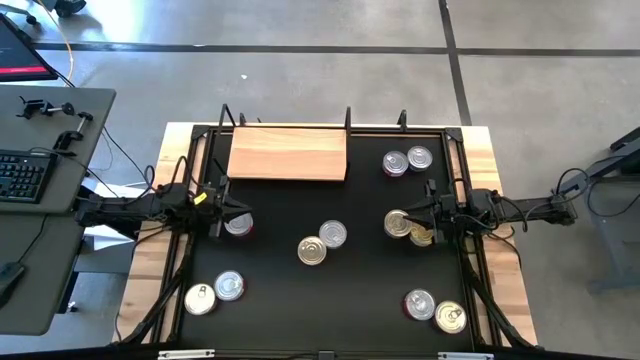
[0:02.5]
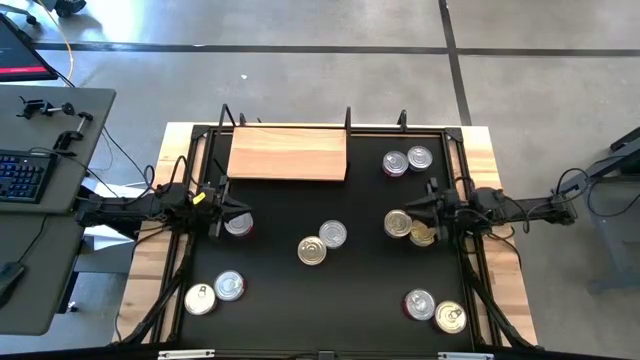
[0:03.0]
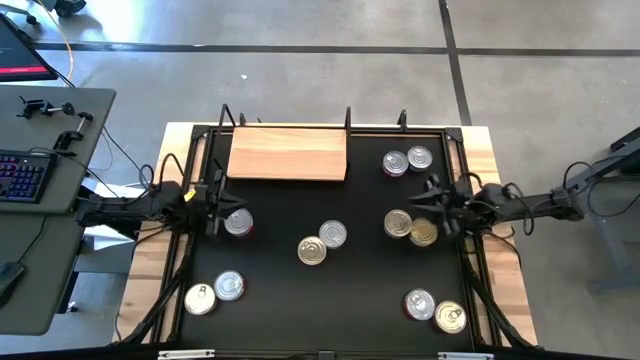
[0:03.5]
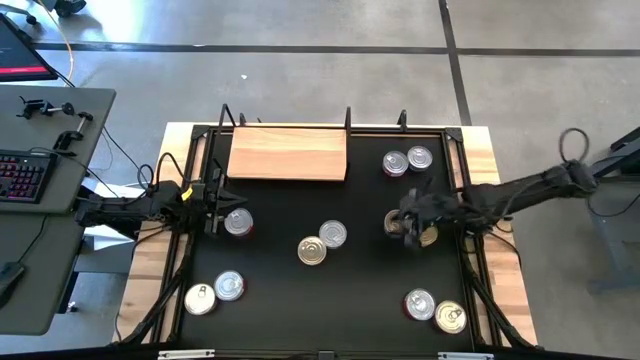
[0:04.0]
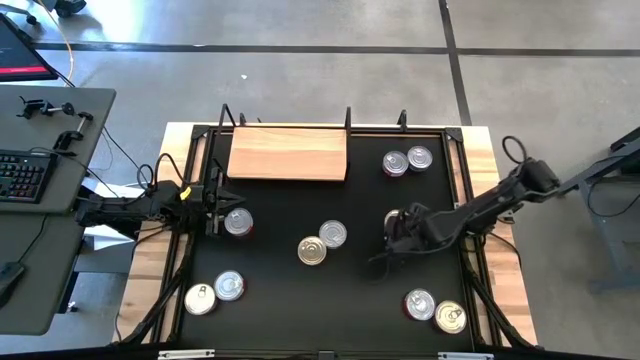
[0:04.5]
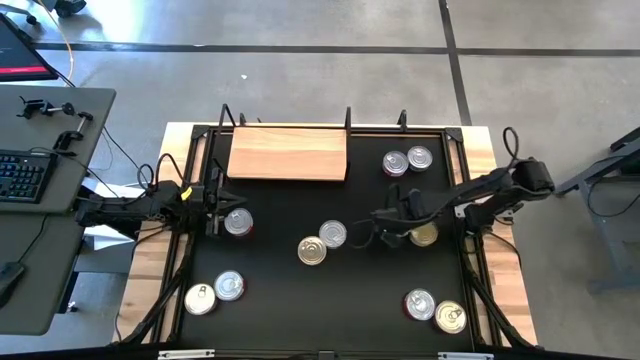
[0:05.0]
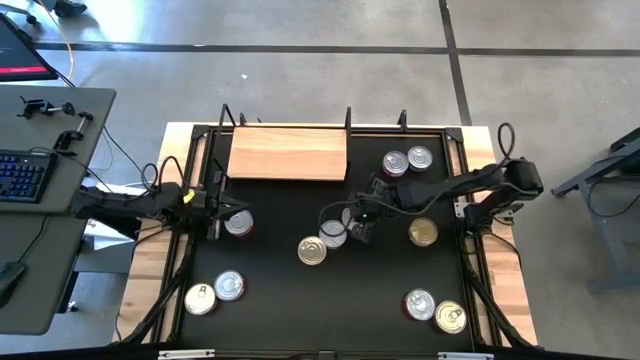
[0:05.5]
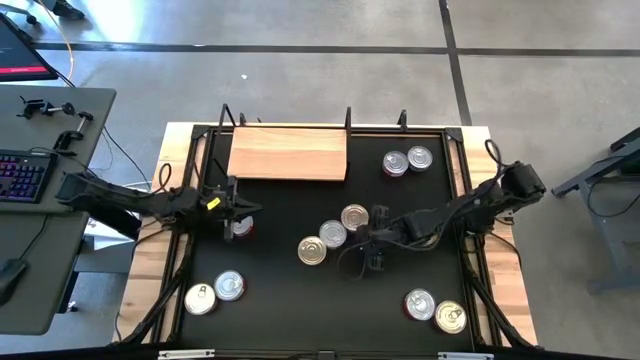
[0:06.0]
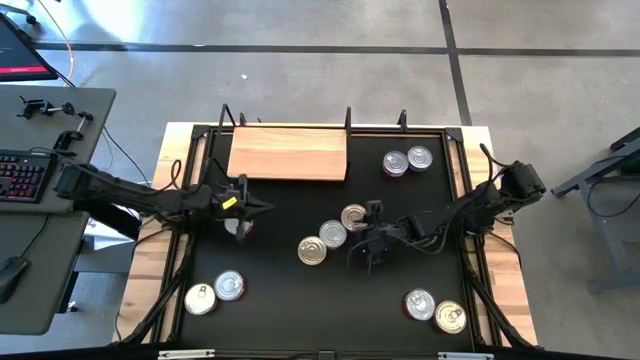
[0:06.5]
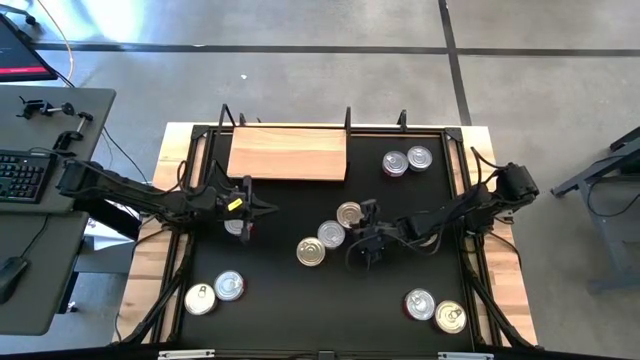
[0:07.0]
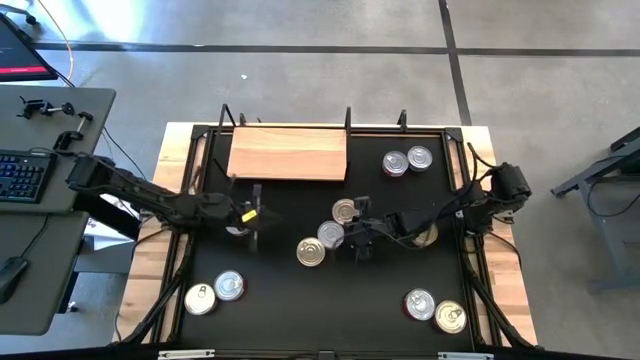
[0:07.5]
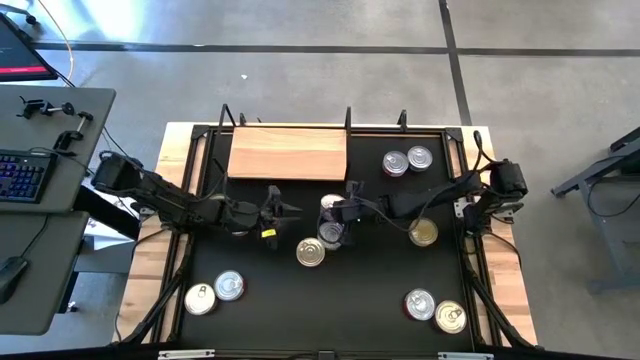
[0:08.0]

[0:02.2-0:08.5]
Task: Stack canned seafood by type on shelf
Put the blue pink tuna can on the shelf

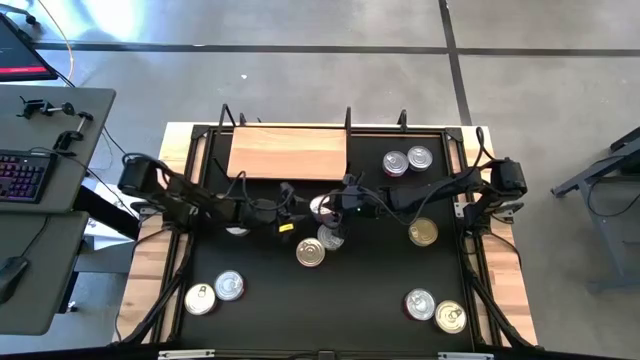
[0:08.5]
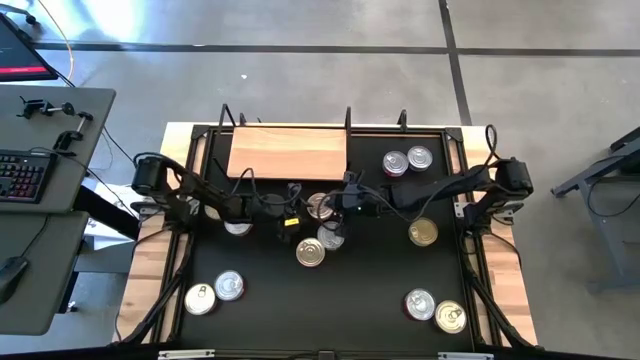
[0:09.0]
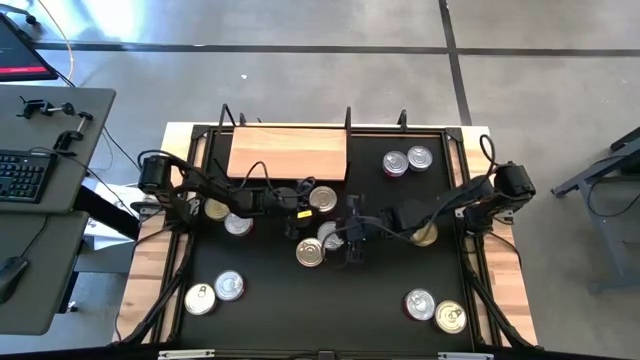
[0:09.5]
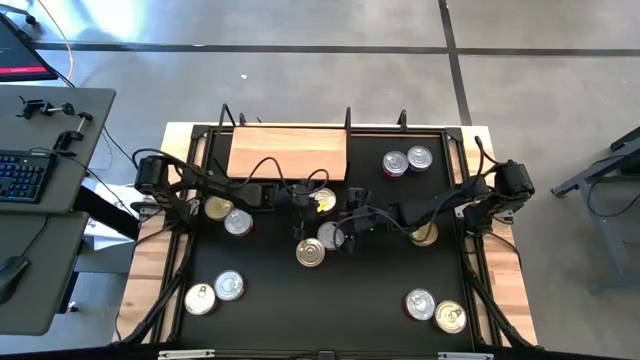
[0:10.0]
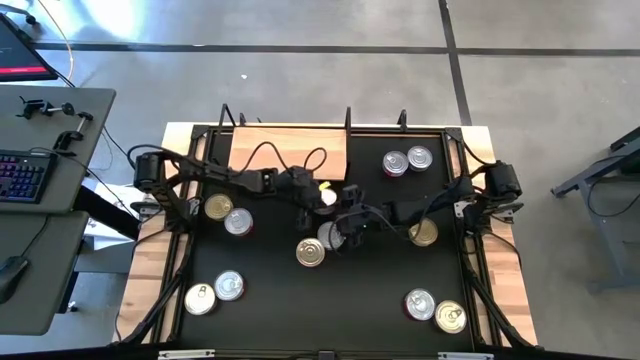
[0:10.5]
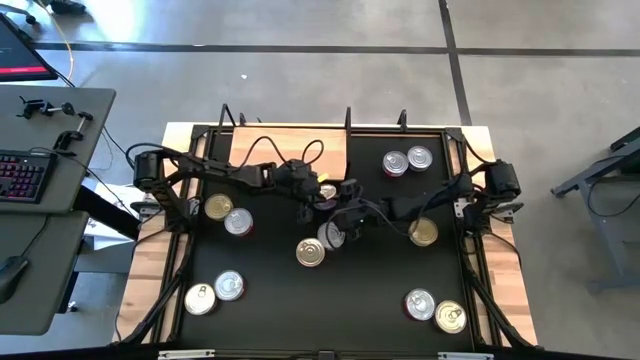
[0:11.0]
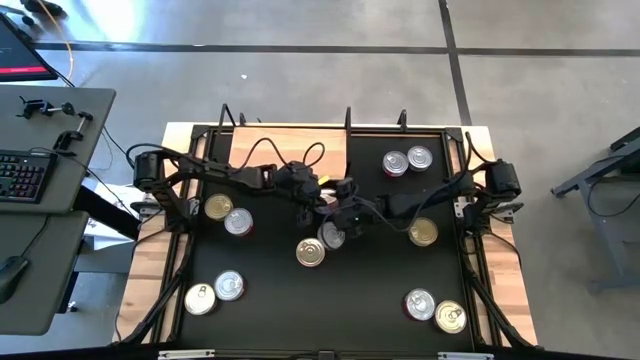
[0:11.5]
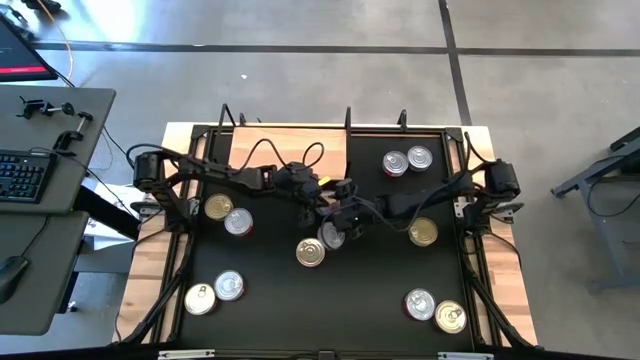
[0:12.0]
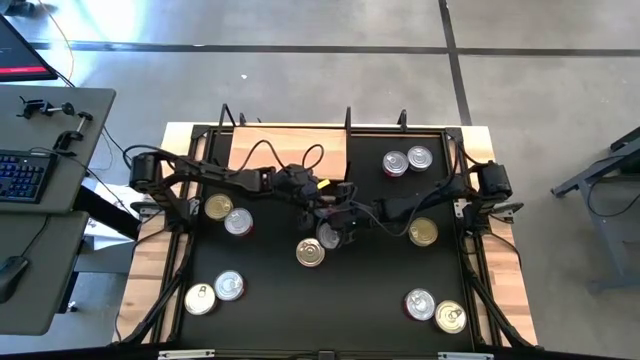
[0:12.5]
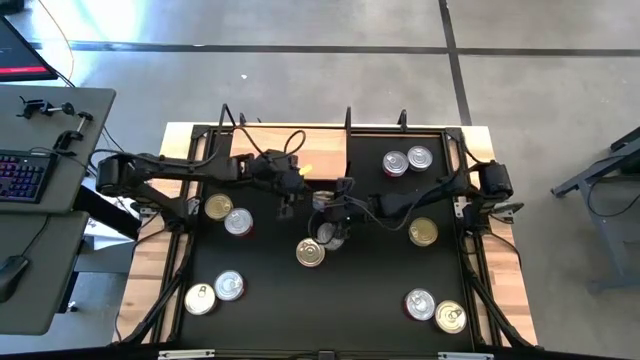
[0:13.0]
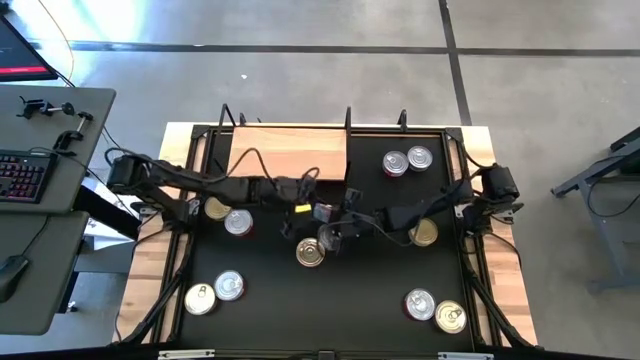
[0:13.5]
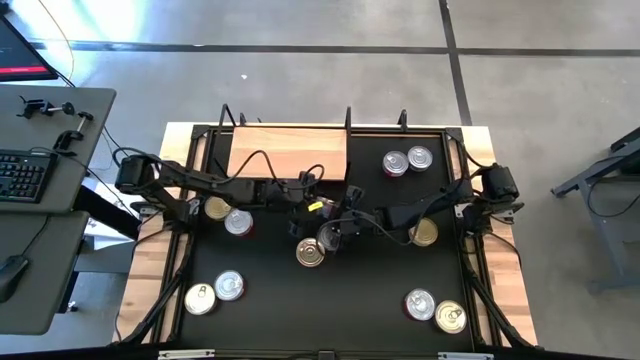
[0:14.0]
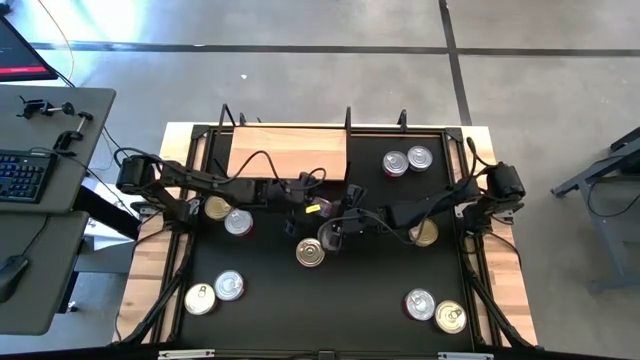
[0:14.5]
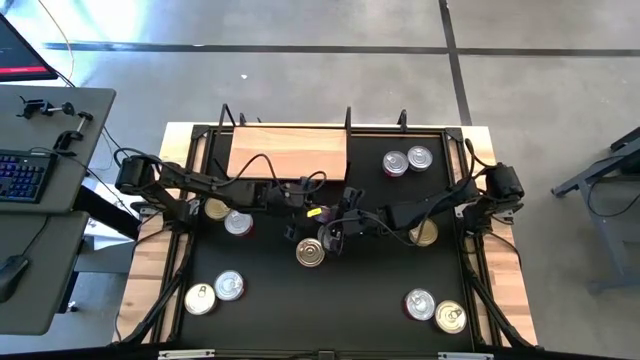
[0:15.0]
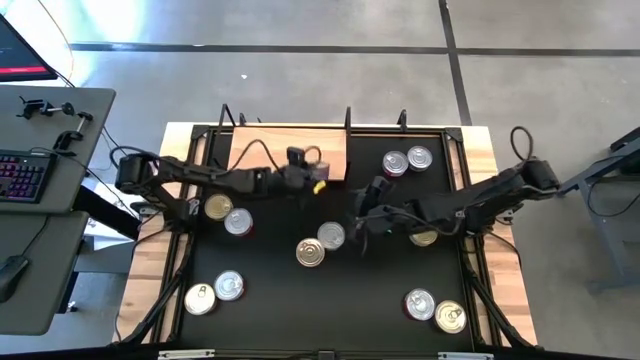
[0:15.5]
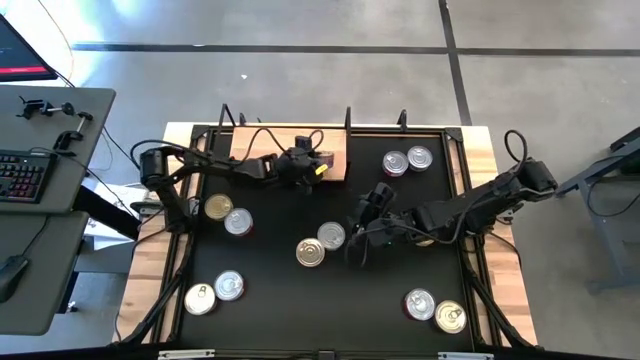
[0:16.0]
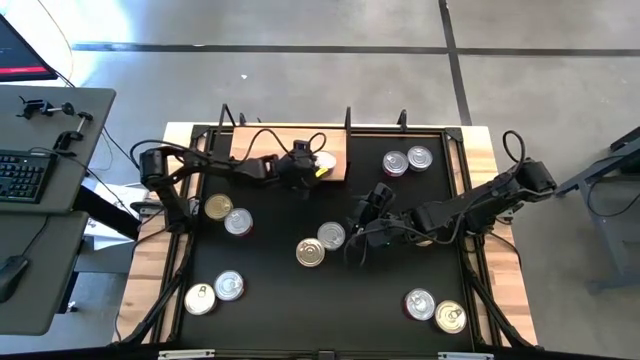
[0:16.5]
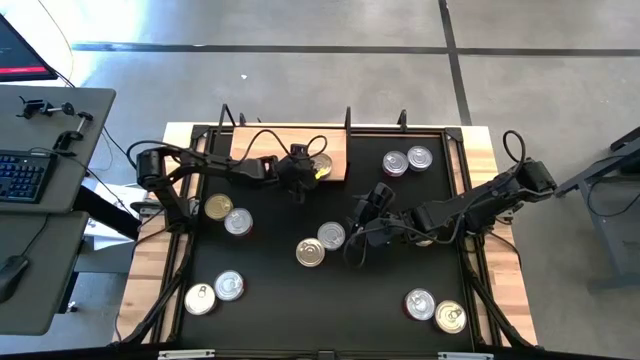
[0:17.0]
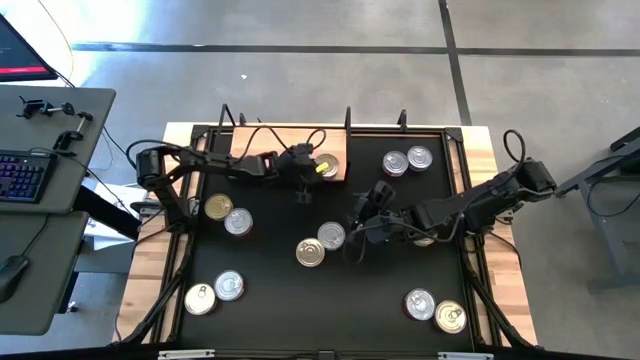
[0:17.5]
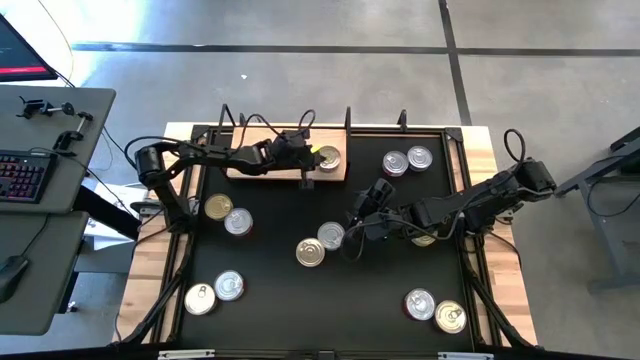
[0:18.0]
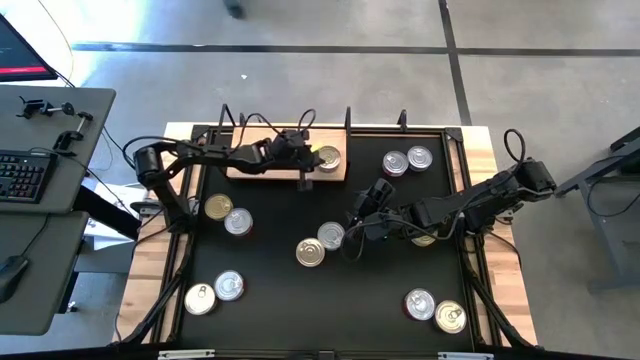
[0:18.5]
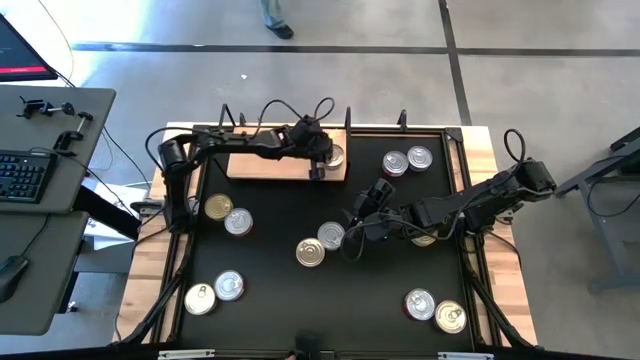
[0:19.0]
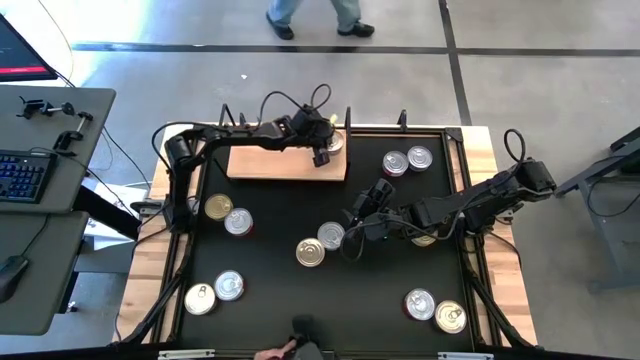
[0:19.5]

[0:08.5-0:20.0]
Put the blue pink tuna can on the shelf

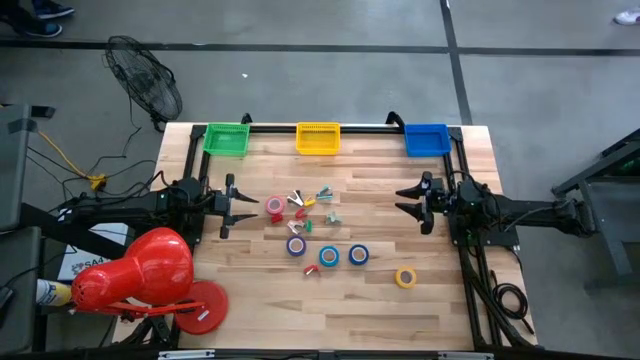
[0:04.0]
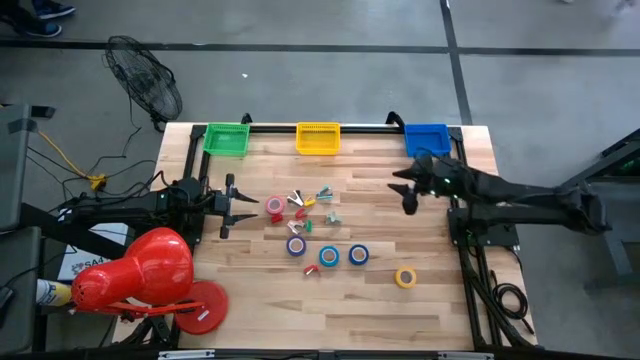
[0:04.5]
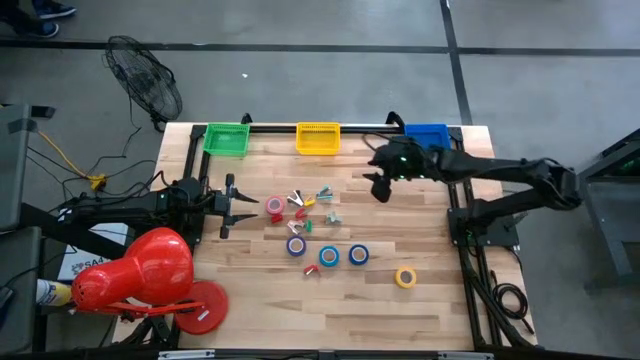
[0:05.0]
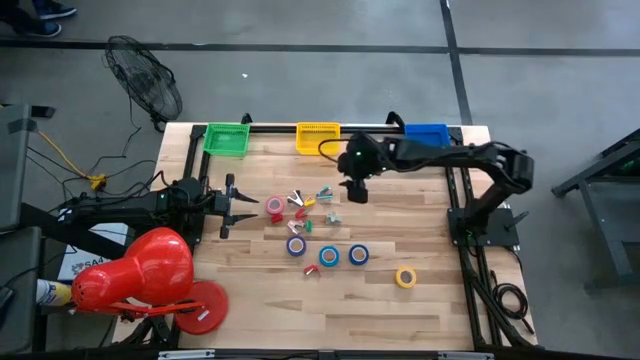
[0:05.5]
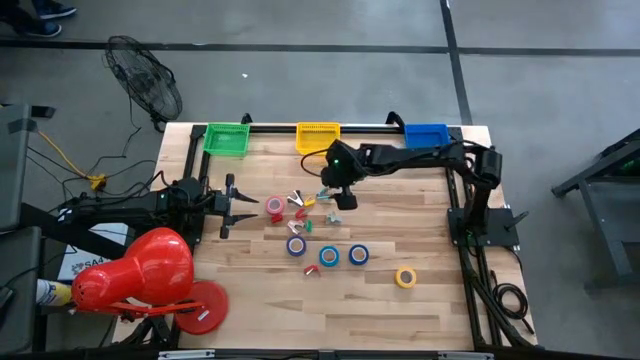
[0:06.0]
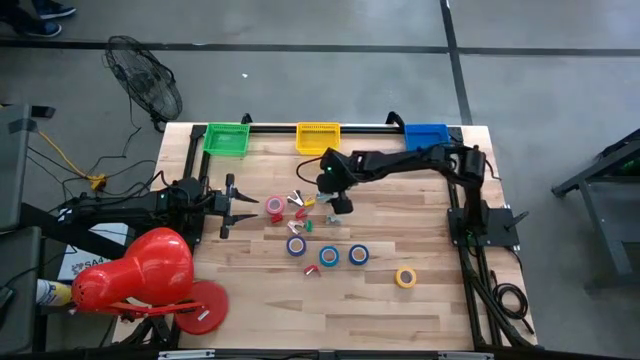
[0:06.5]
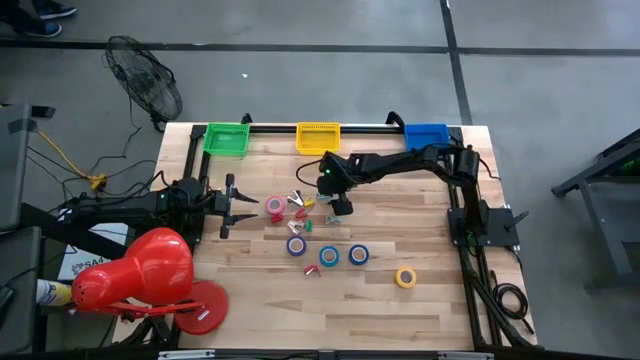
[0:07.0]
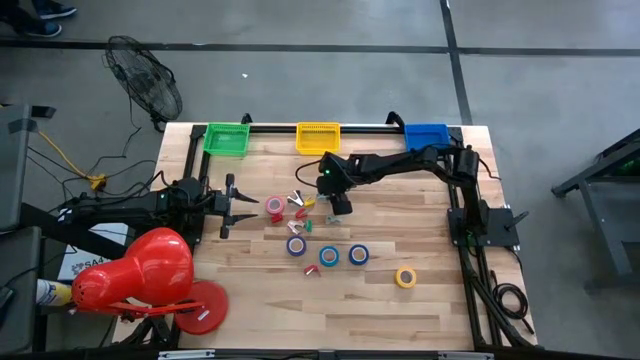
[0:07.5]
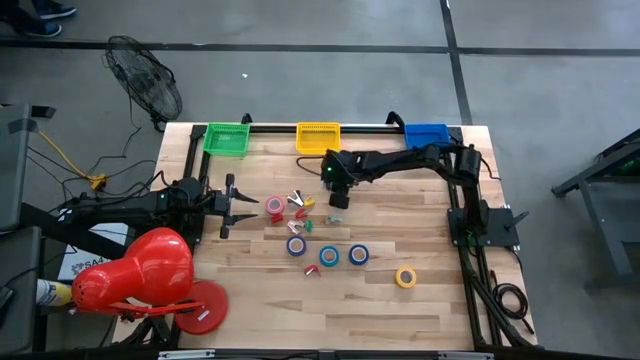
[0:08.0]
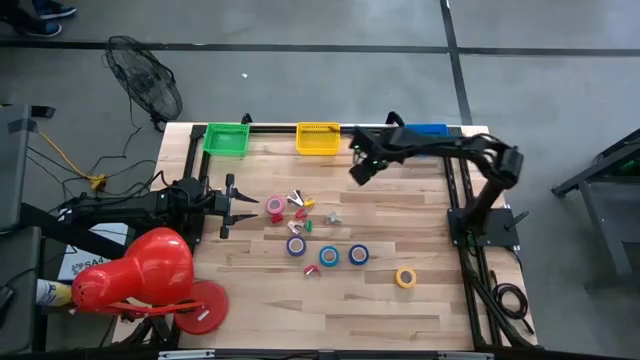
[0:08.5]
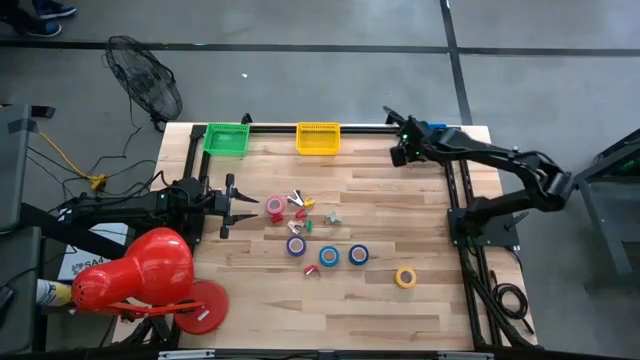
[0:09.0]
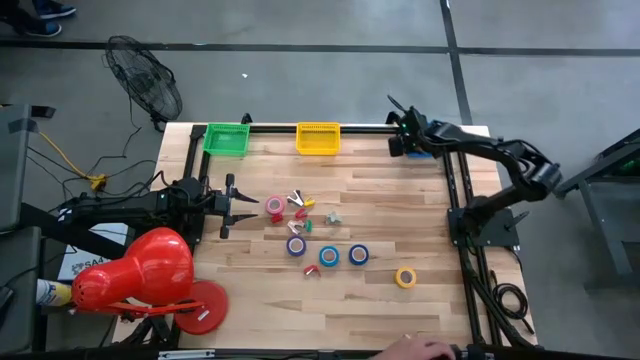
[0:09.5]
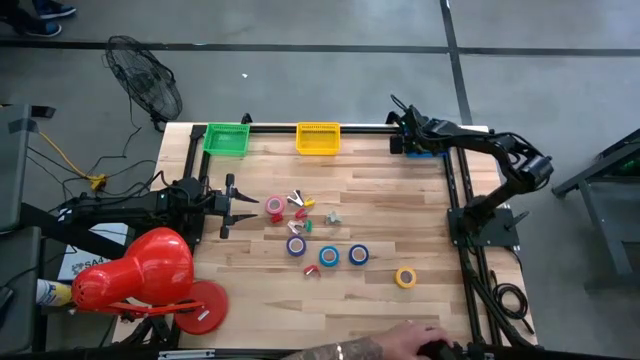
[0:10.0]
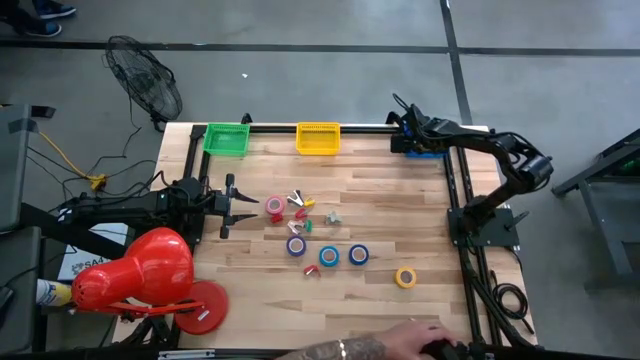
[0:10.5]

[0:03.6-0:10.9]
Task: Pick and place Stapler, Stapler remover, tape
Put the blue staple remover into the blue bin
